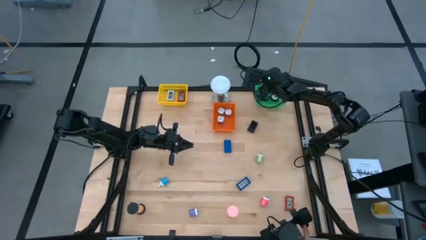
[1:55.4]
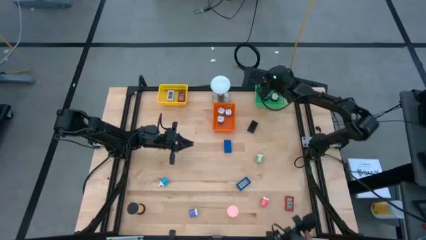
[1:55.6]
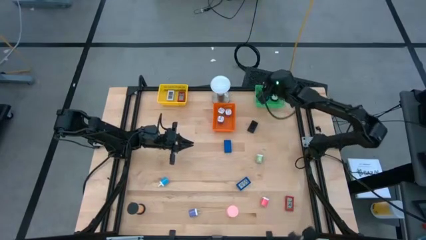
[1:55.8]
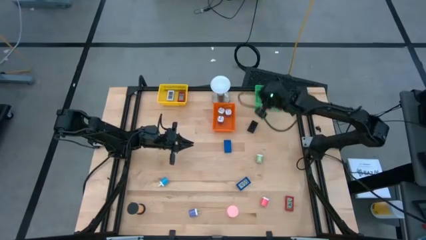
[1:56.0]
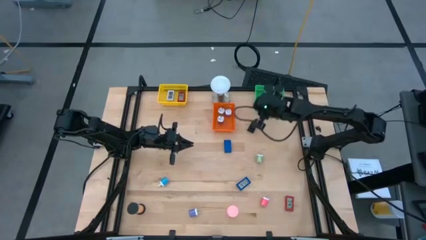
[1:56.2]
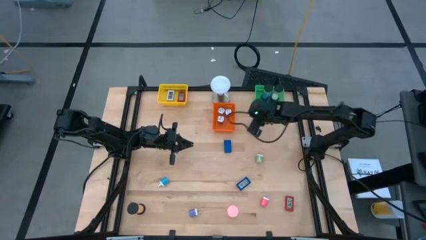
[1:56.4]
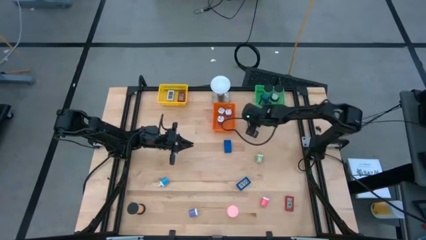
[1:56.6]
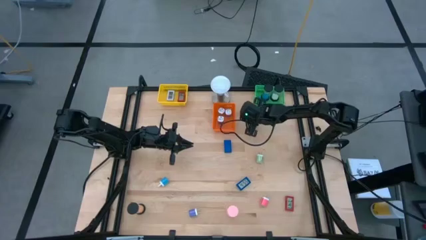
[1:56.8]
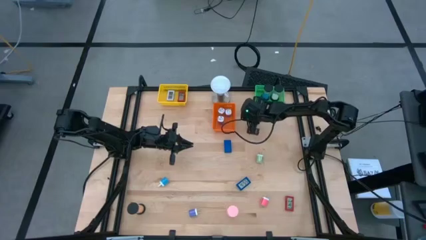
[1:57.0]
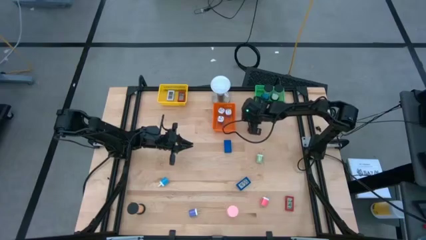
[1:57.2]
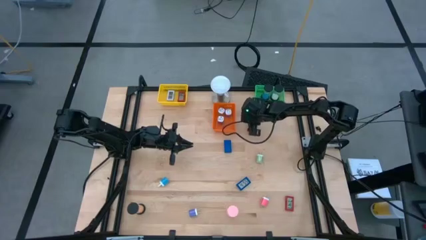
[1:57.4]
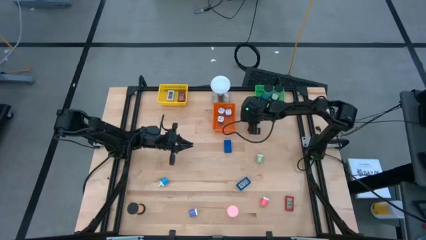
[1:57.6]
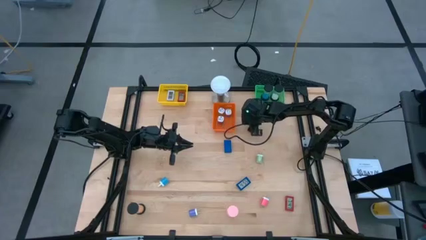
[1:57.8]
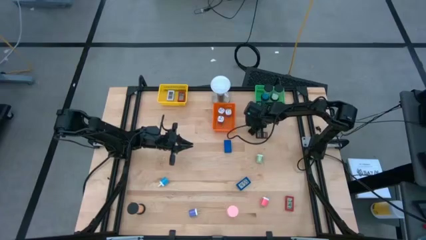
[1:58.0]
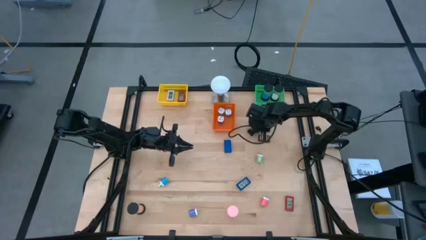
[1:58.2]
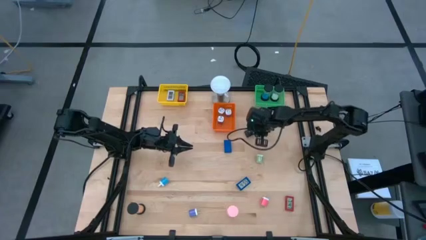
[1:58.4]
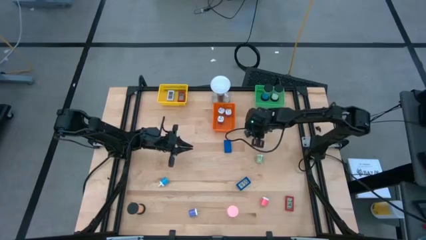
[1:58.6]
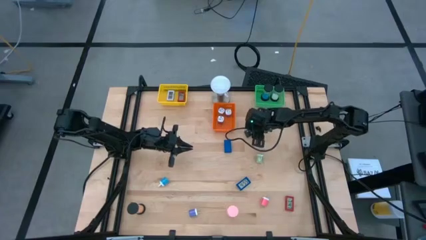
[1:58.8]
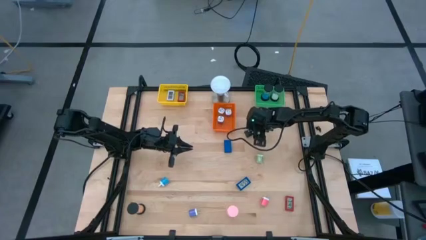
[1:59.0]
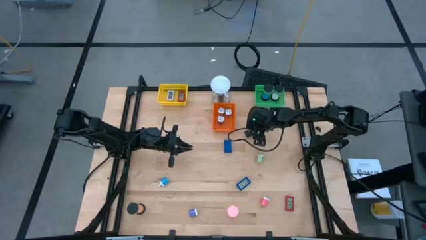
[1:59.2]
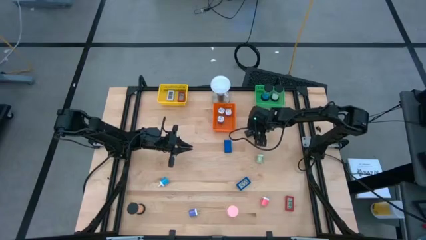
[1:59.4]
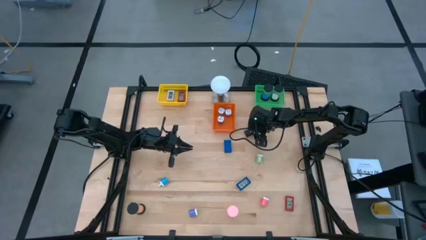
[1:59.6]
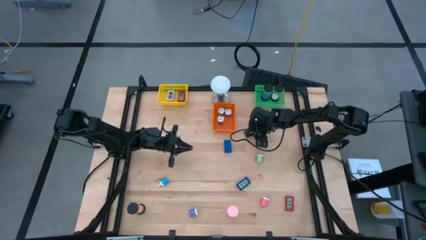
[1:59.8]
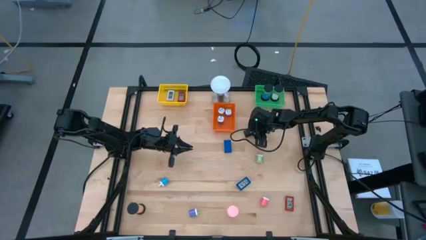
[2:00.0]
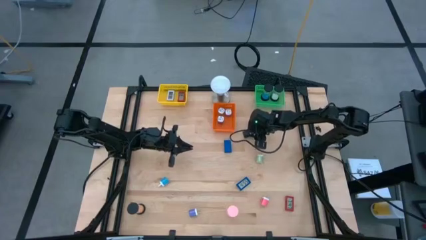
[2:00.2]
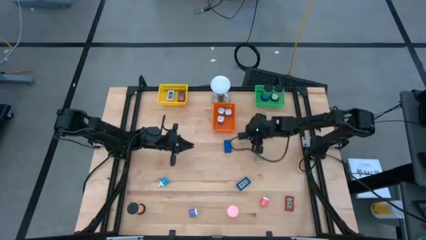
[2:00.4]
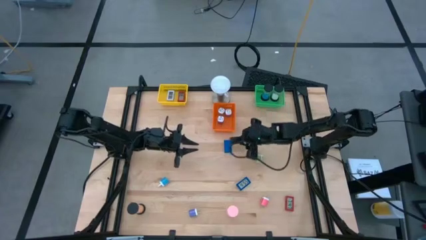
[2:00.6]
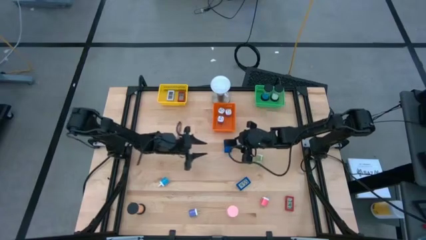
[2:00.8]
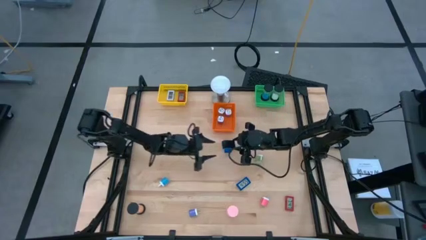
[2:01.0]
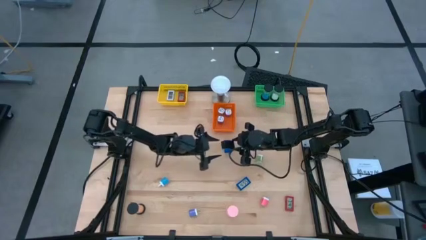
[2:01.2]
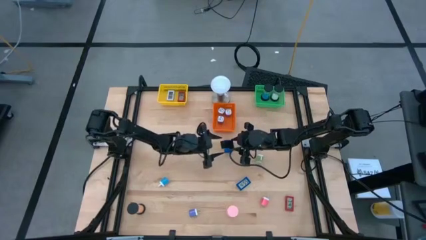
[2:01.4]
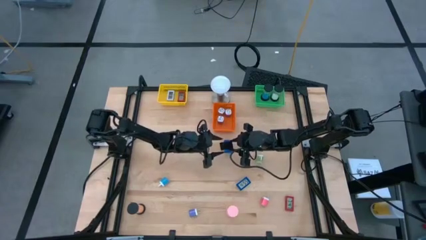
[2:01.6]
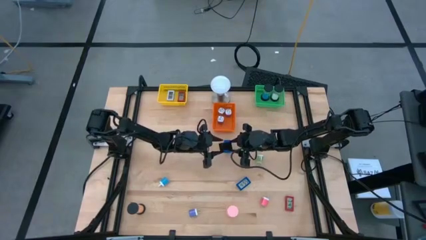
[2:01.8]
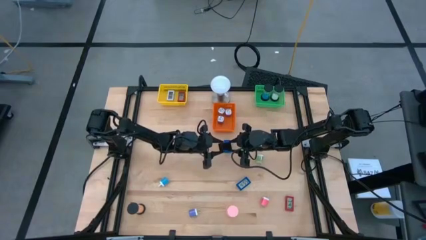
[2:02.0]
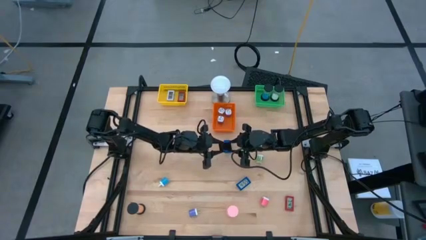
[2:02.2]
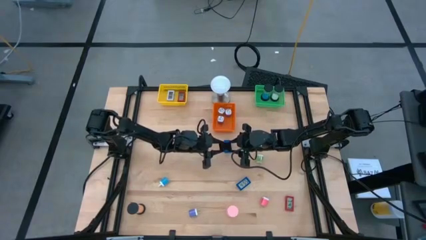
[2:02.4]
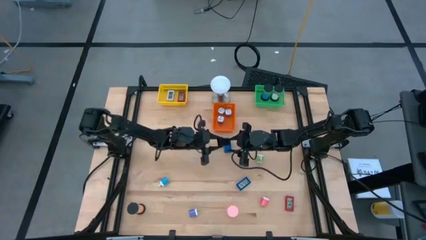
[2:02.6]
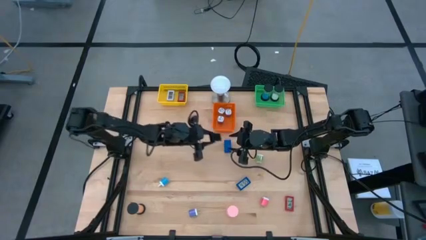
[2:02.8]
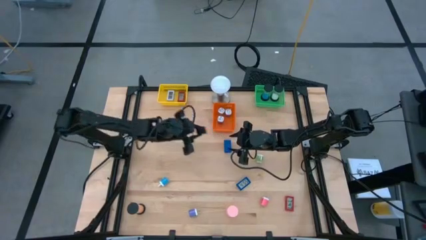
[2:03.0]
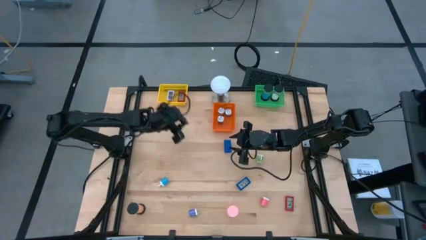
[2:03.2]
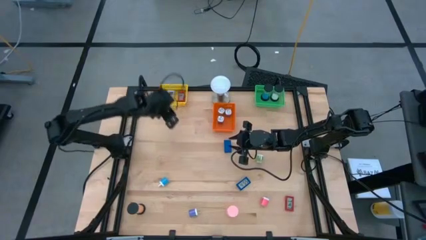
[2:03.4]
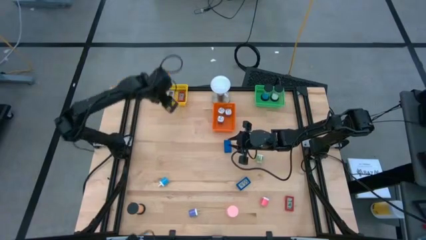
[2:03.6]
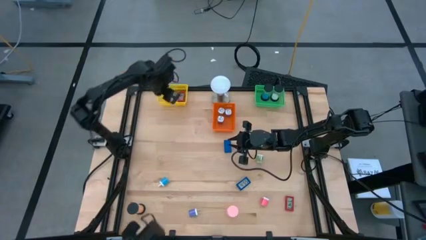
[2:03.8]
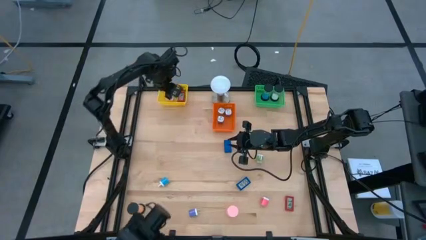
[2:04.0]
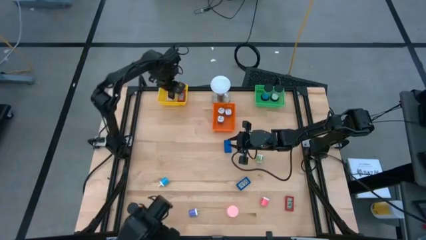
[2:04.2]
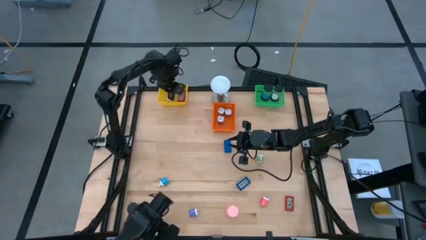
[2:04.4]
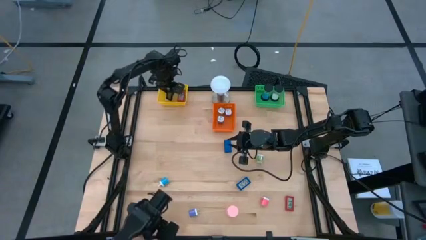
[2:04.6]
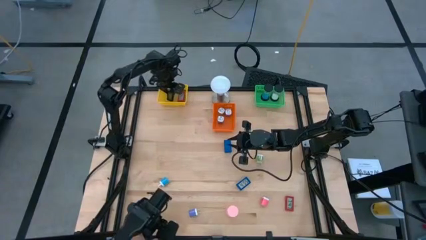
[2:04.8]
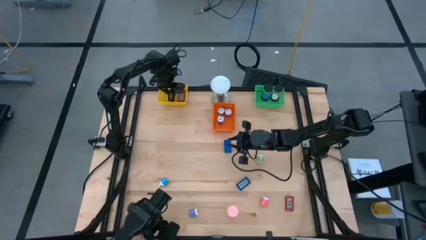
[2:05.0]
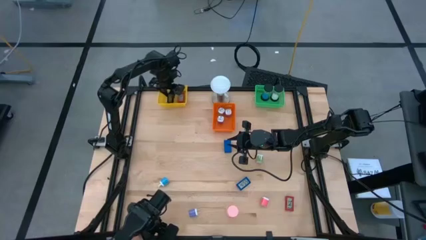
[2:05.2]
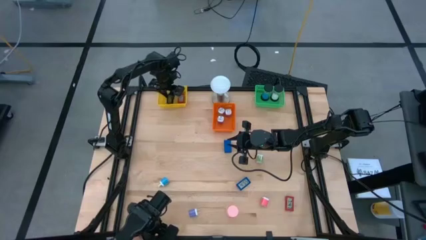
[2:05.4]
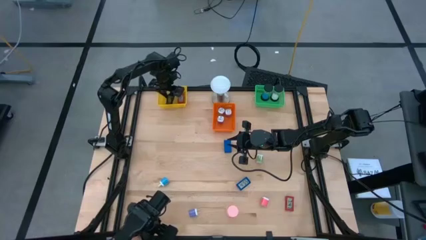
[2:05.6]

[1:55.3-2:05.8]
Task: Pick & Place Office items
Put the black digital clock into the yellow bin

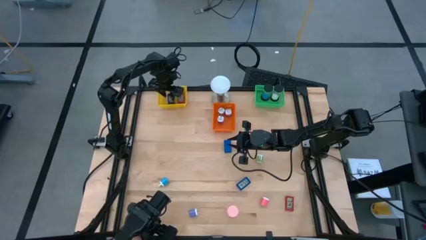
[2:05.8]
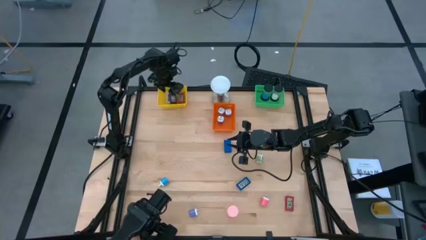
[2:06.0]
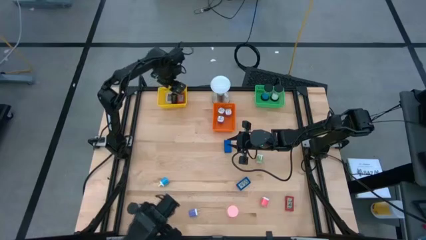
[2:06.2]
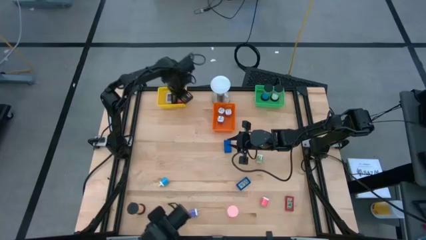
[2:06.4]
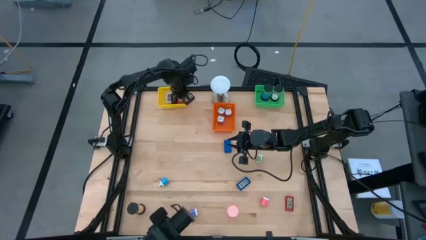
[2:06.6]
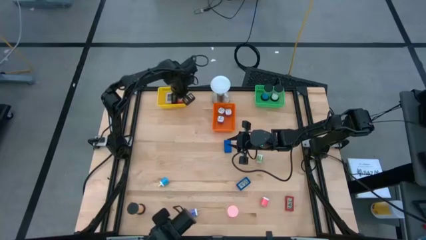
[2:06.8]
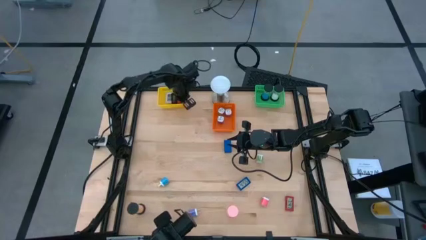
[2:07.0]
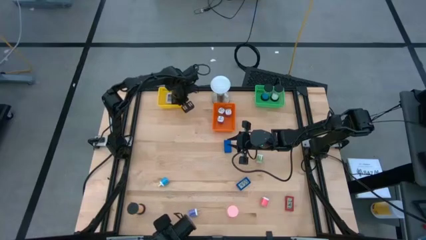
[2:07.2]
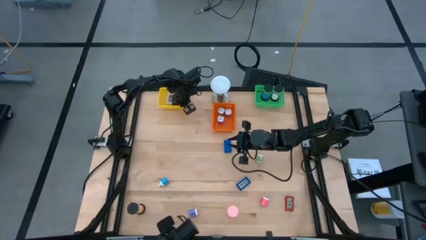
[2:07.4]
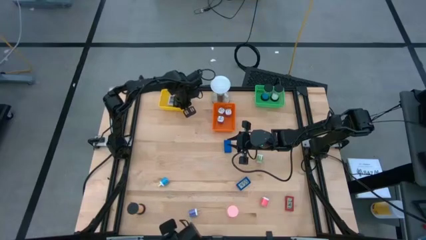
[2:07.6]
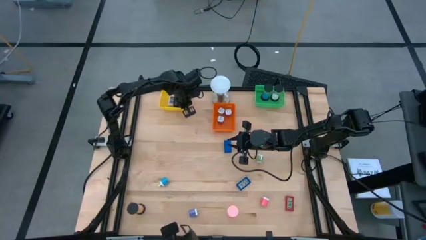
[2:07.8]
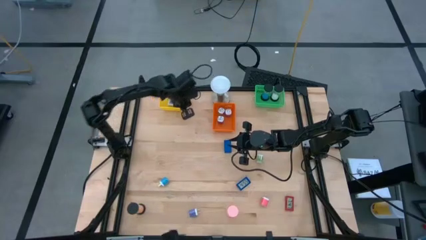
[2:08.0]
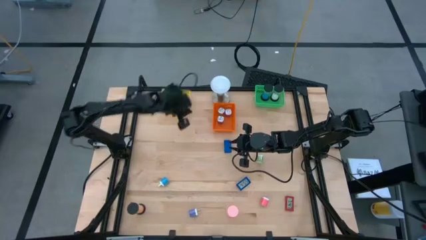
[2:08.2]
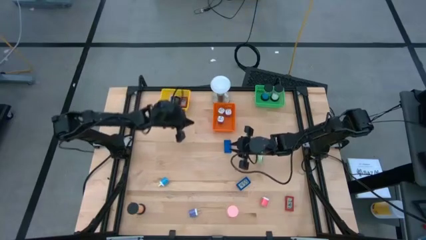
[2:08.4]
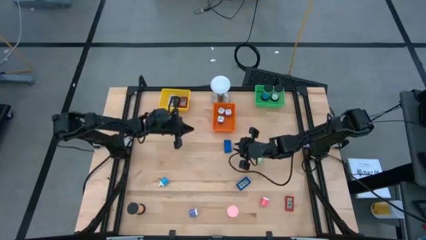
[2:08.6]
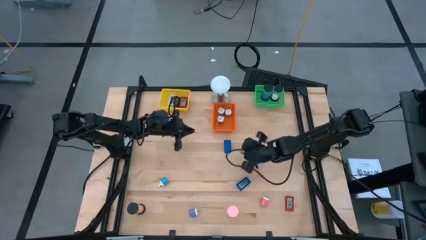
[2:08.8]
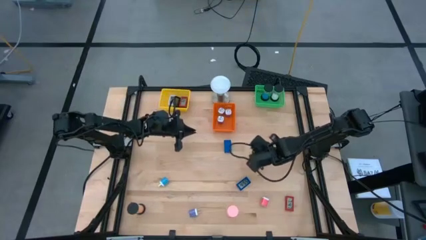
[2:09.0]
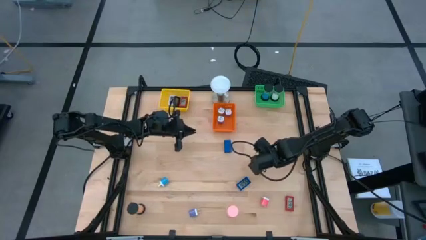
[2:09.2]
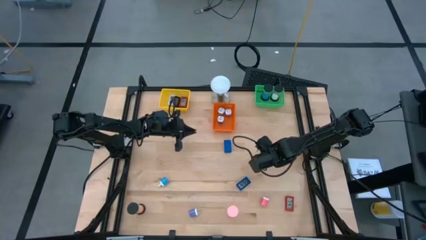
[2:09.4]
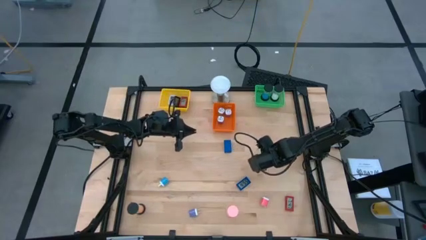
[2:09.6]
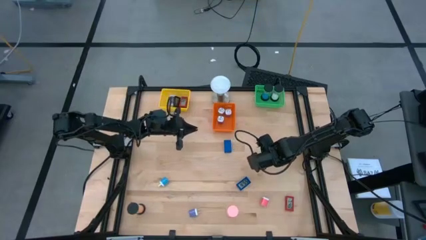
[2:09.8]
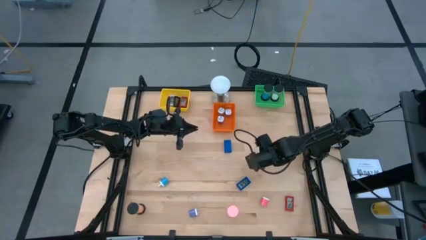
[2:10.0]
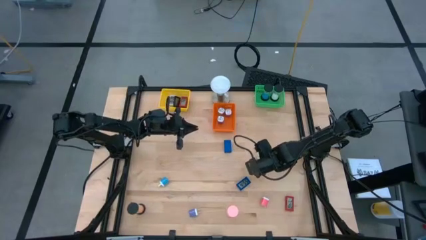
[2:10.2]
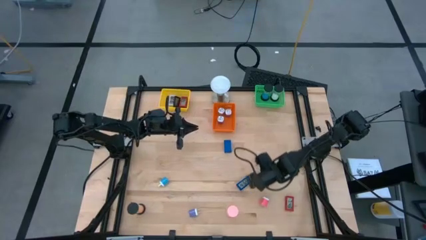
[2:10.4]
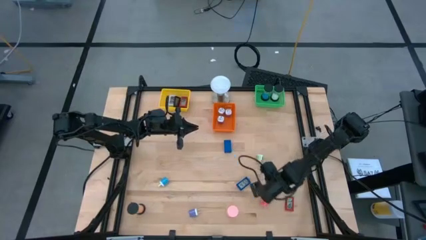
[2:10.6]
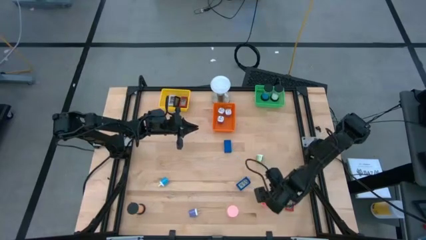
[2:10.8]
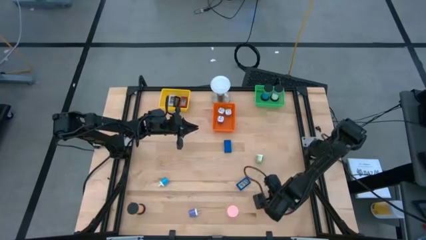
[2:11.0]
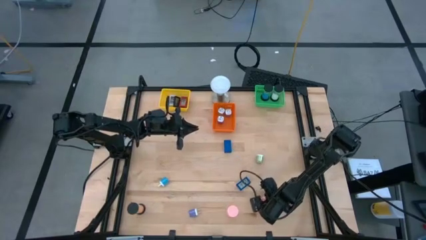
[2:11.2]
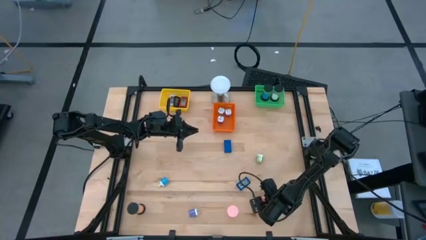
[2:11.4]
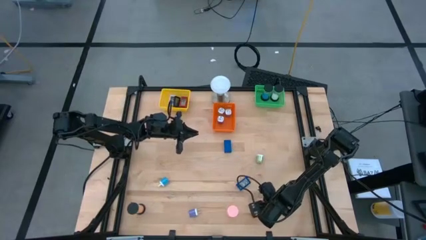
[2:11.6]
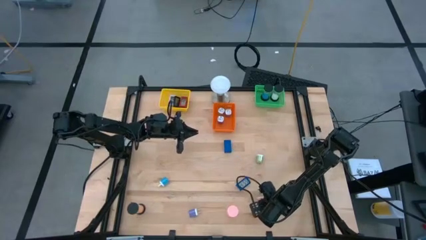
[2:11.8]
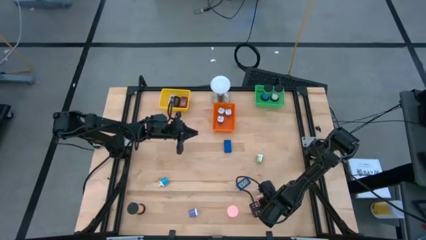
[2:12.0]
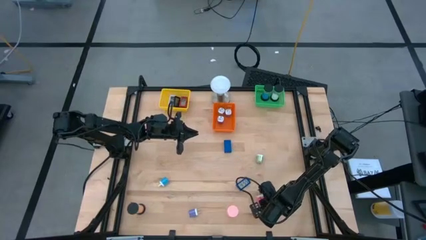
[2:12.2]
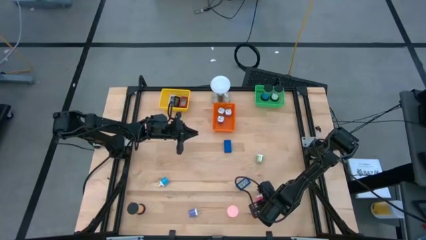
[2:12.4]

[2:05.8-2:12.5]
Put the pink charger adapter into the orange bin
